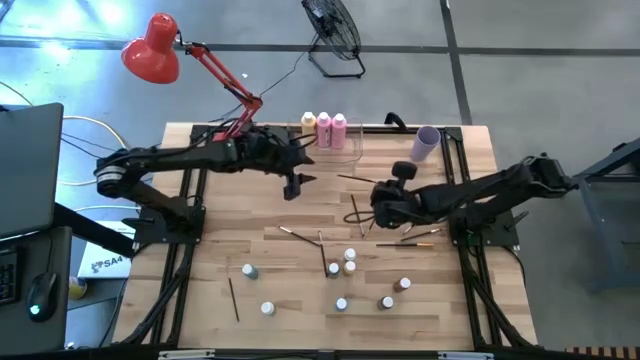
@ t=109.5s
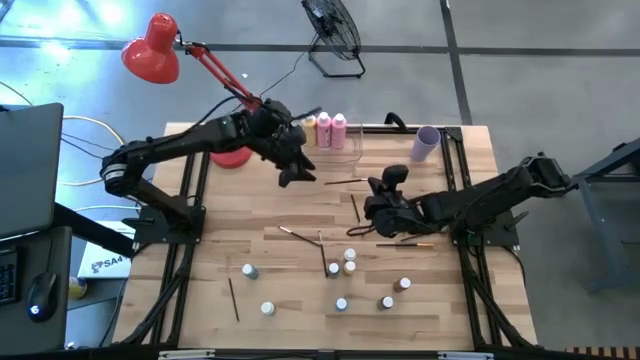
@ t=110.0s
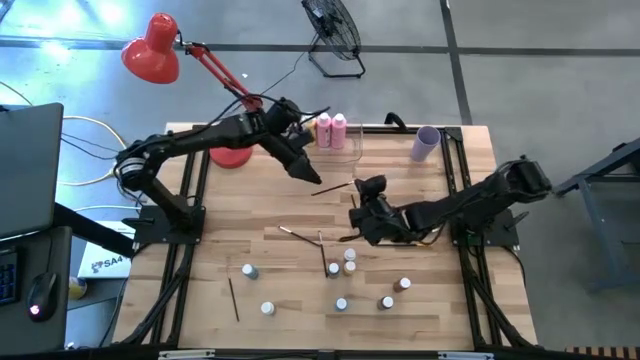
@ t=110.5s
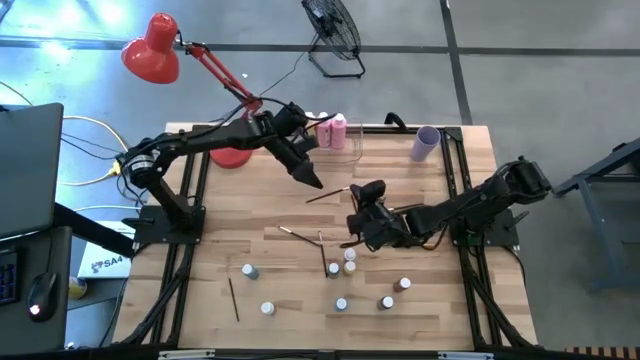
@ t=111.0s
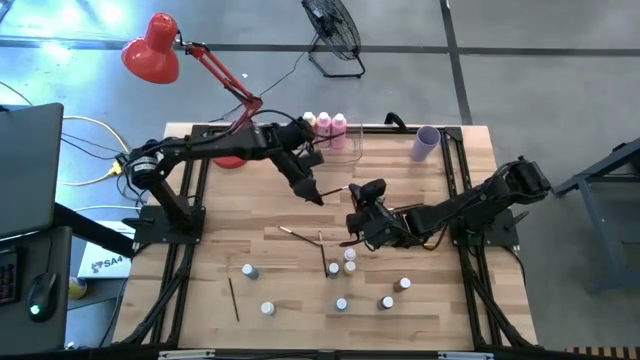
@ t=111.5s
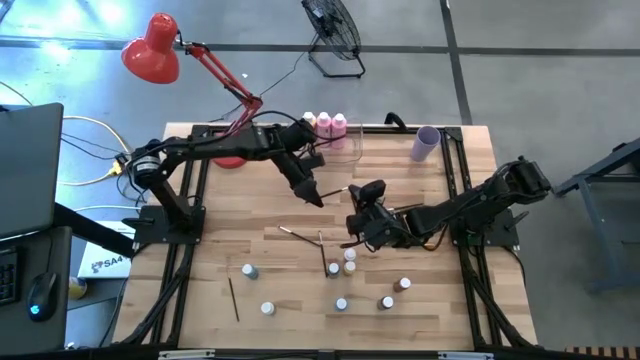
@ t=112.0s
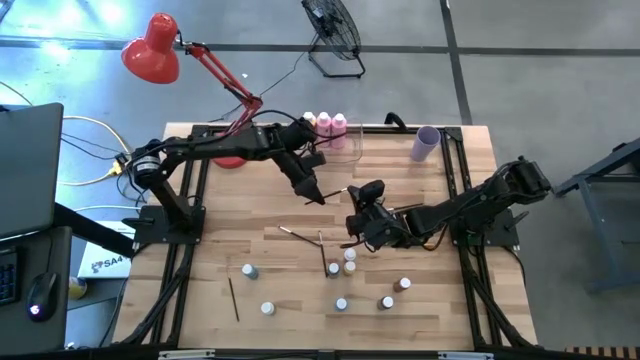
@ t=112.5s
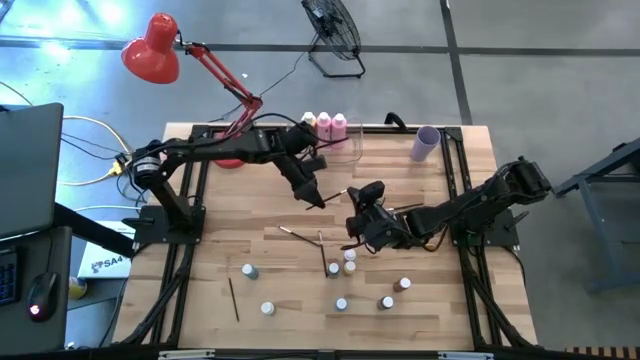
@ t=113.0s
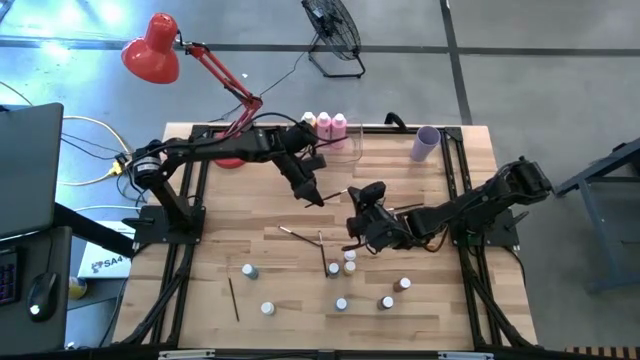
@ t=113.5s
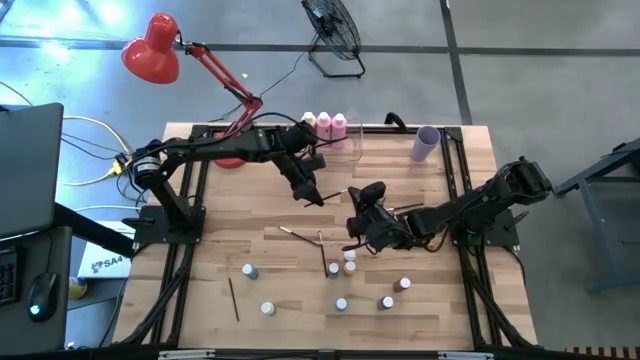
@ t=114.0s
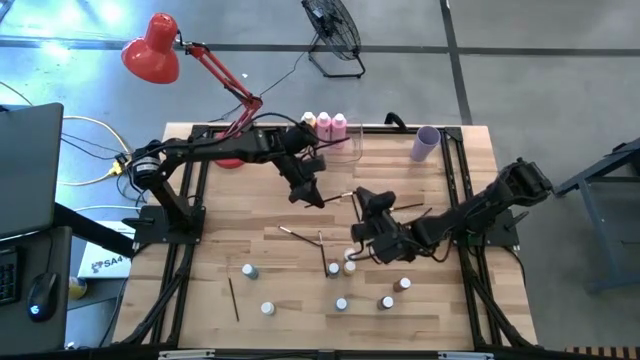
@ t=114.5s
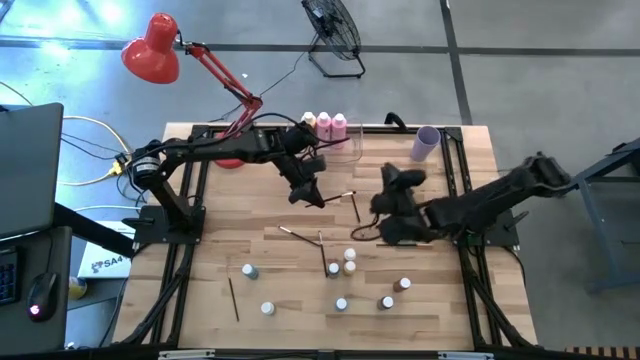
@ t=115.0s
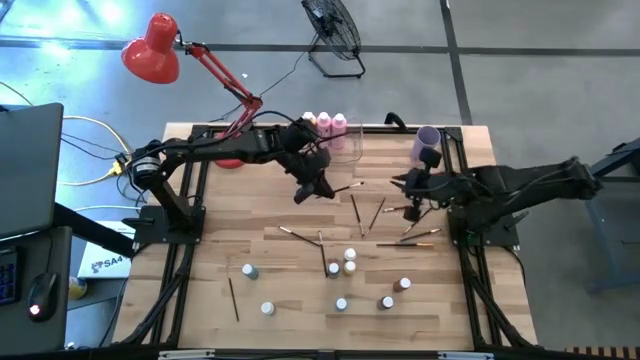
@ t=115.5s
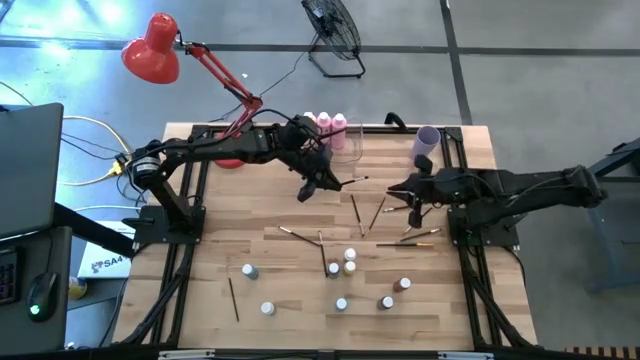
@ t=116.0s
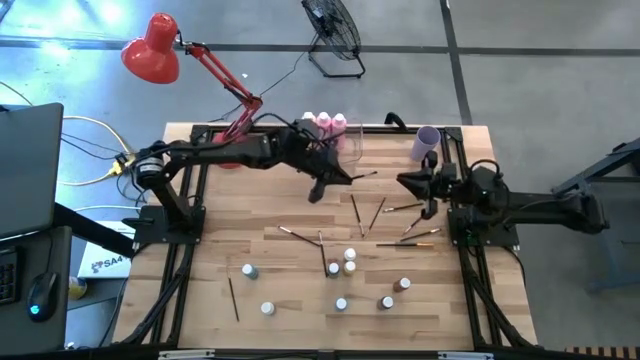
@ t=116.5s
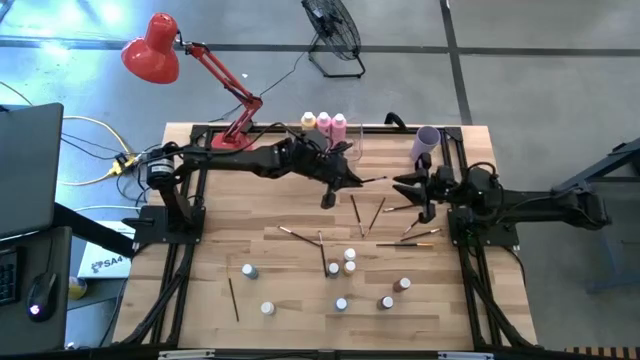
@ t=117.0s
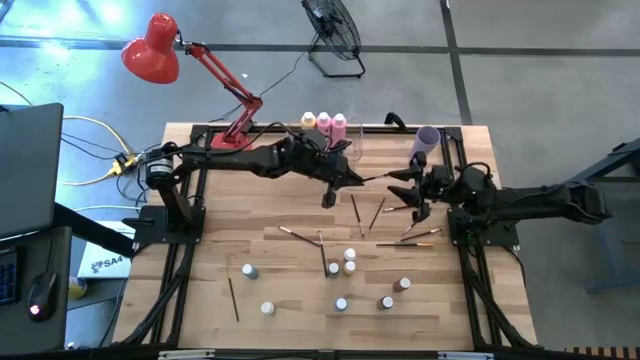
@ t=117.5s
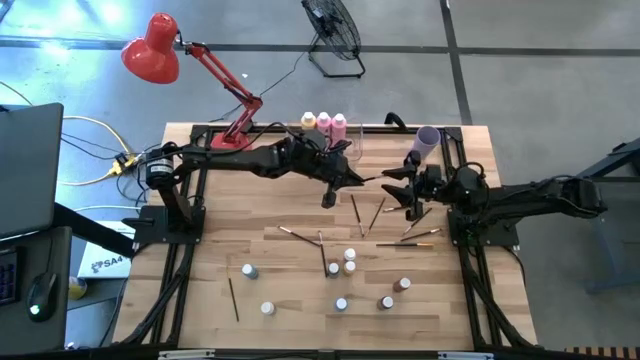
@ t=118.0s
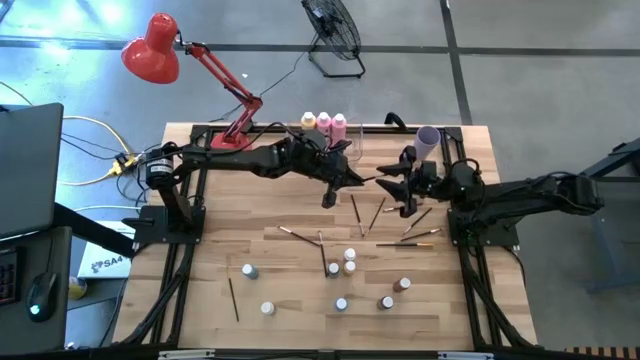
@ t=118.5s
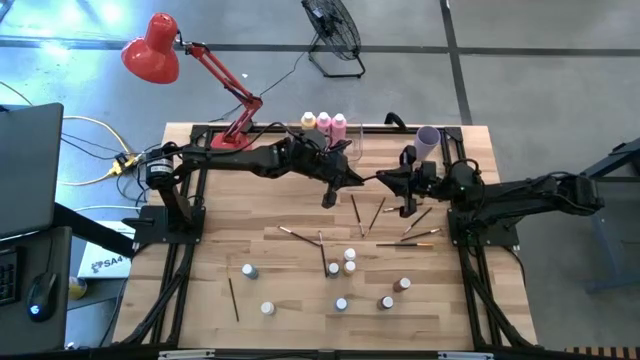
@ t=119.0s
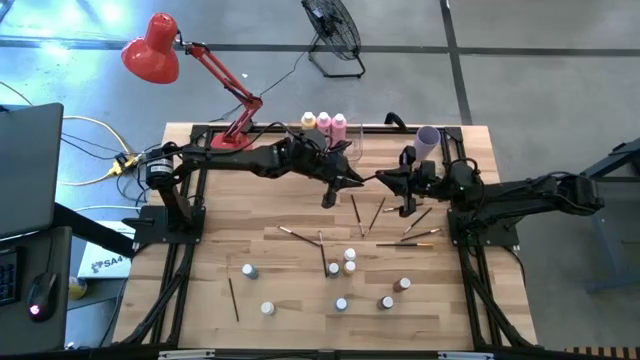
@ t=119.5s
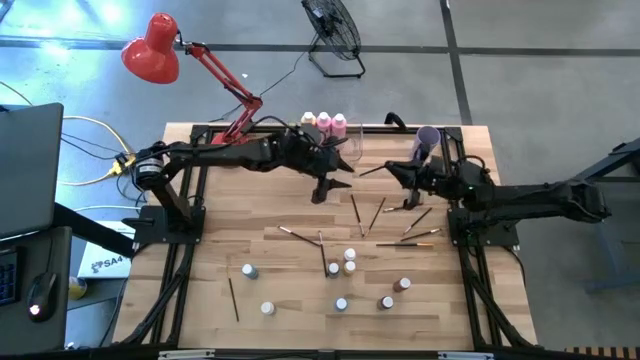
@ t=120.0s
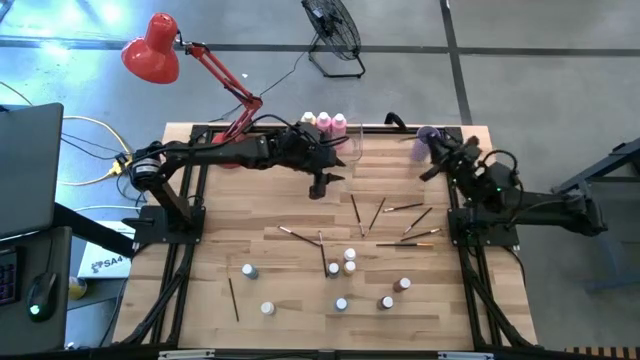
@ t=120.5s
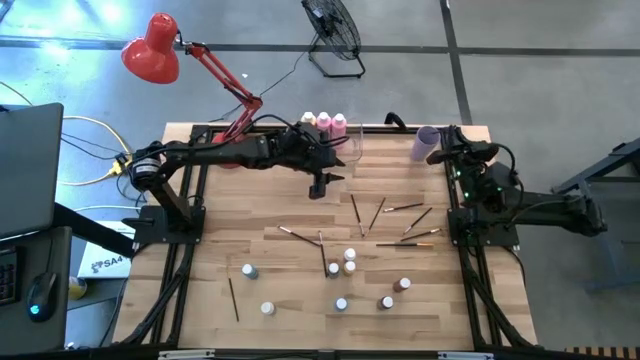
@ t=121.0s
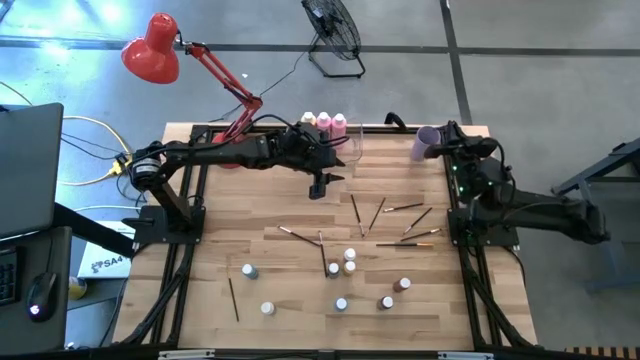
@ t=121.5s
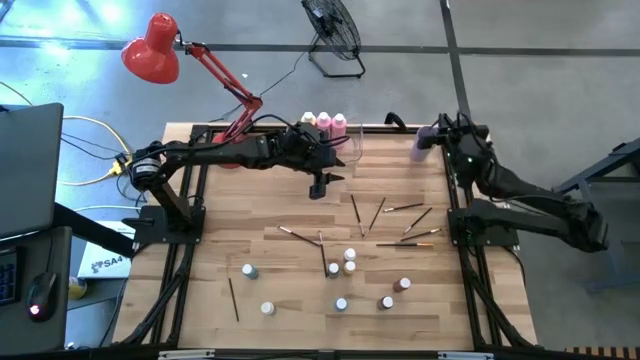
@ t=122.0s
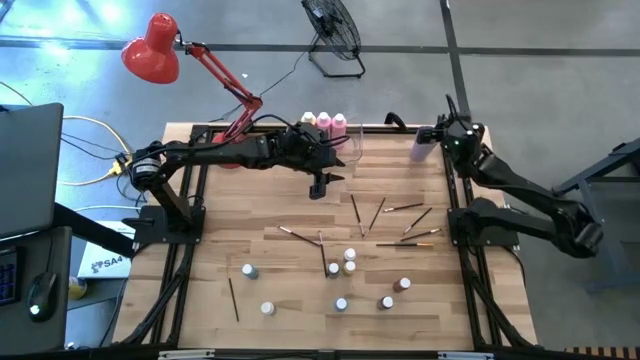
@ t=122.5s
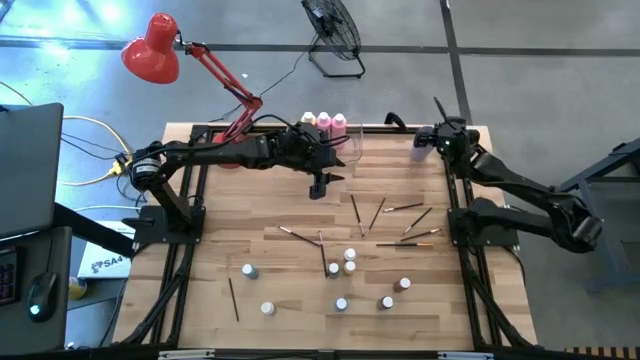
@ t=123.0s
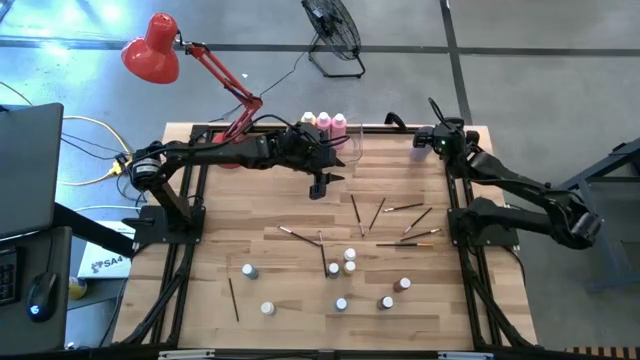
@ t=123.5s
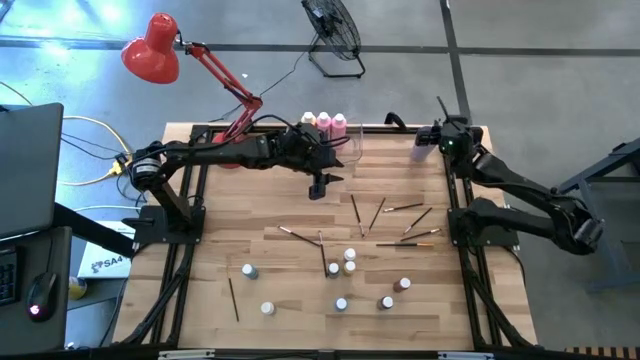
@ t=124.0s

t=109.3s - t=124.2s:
Task: Pick & Place Paint Supplies
Put the black paint brush into the violet cup

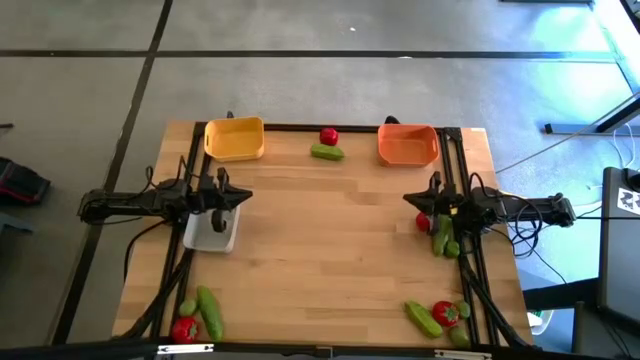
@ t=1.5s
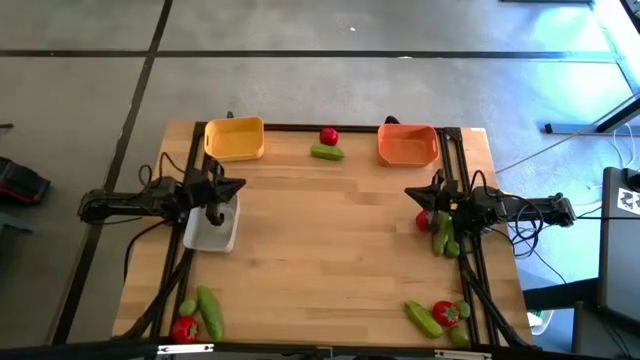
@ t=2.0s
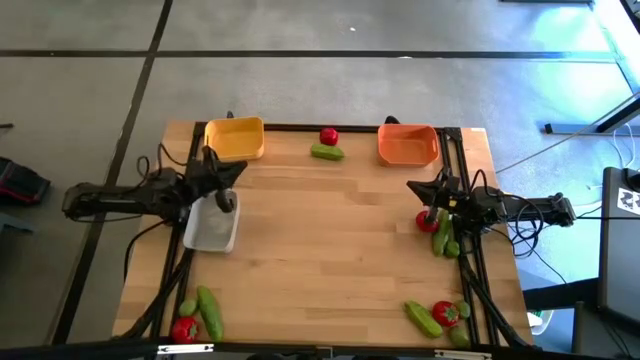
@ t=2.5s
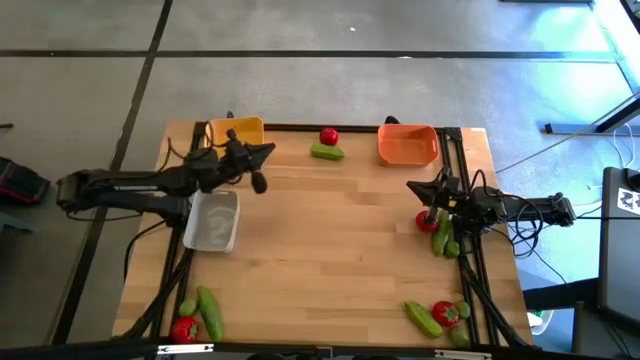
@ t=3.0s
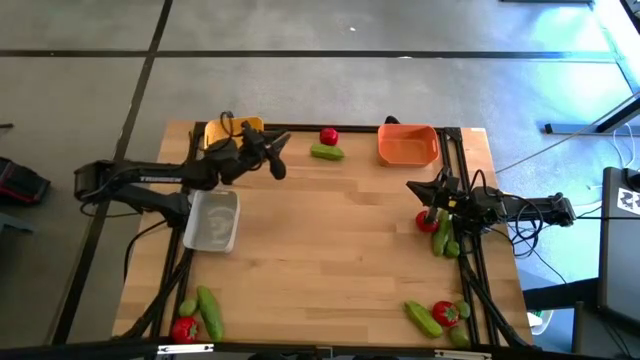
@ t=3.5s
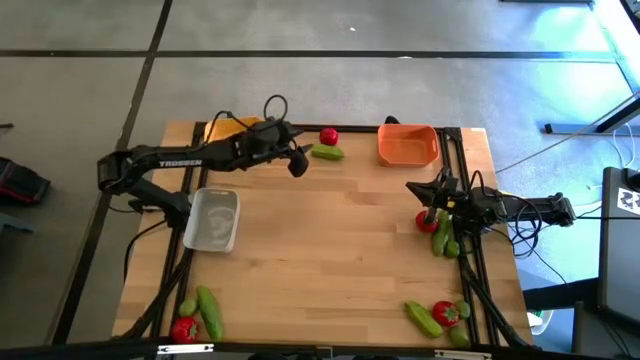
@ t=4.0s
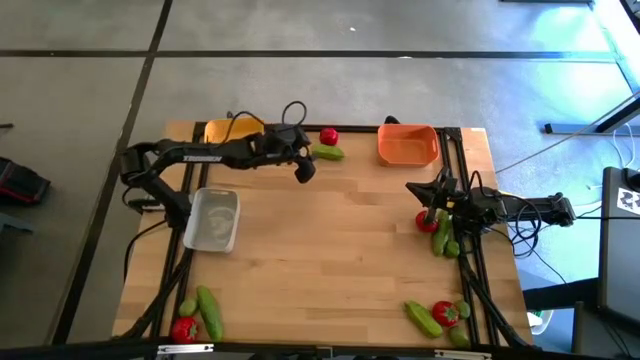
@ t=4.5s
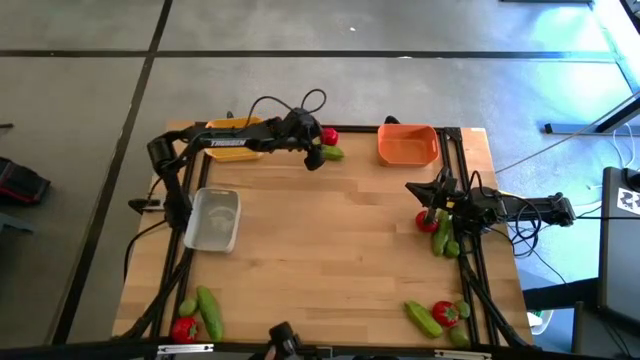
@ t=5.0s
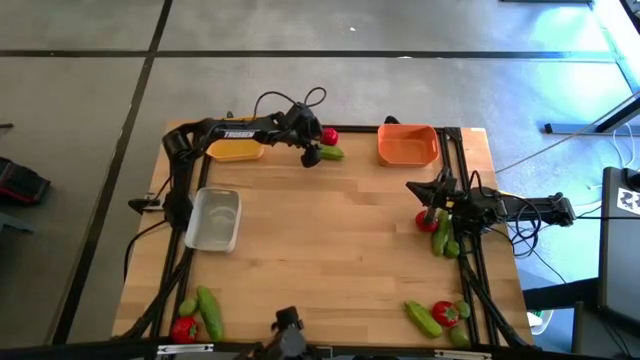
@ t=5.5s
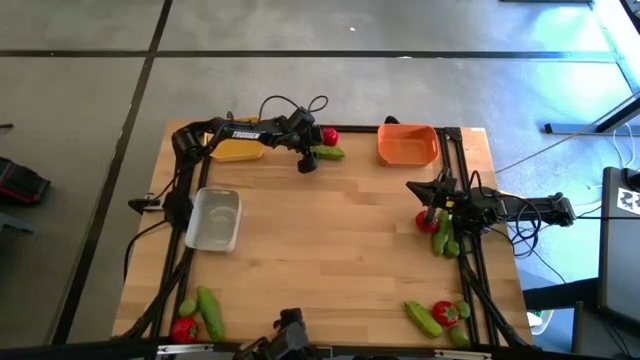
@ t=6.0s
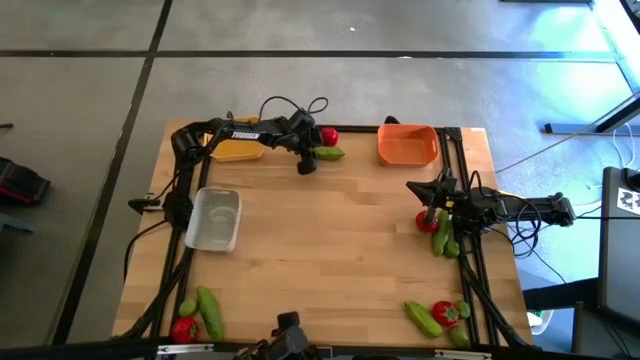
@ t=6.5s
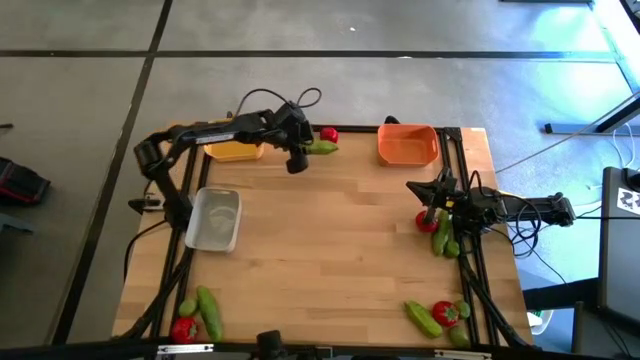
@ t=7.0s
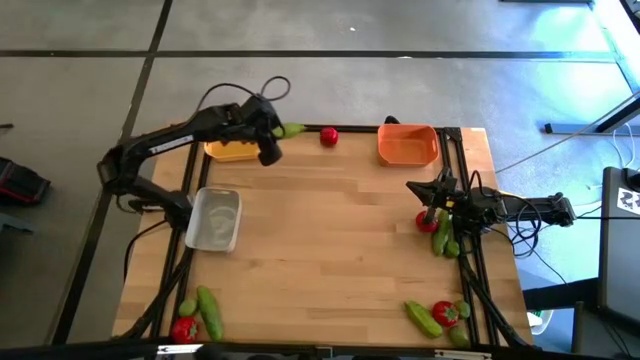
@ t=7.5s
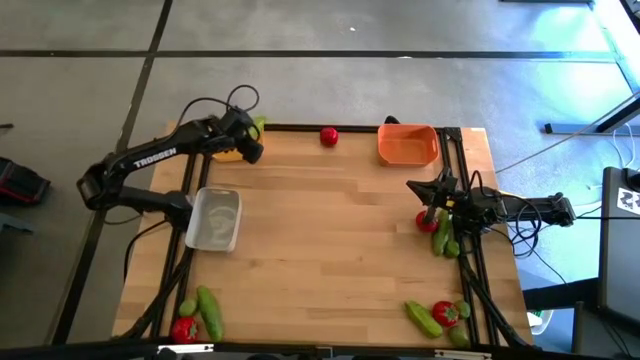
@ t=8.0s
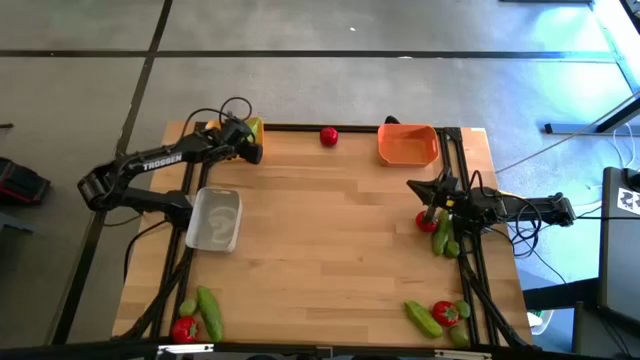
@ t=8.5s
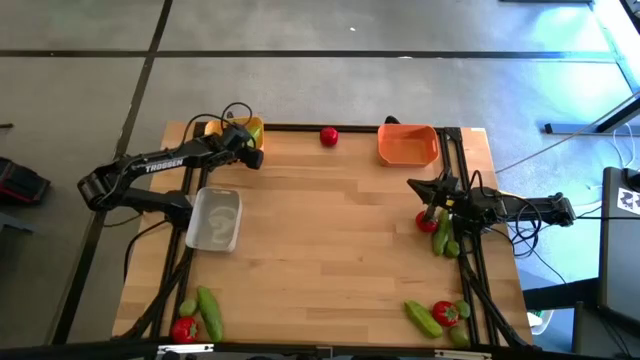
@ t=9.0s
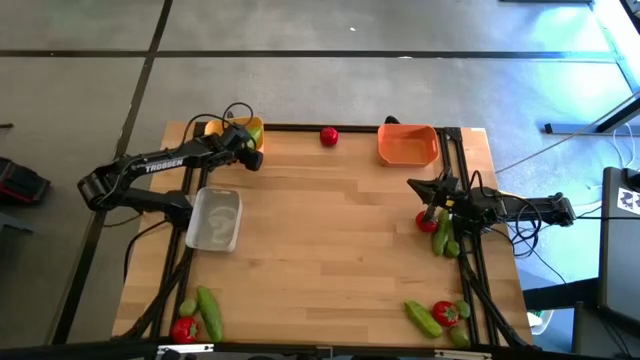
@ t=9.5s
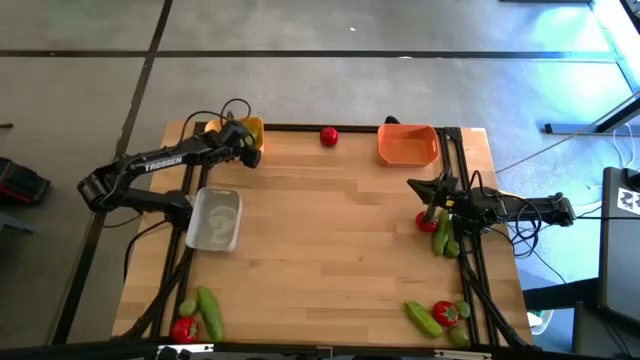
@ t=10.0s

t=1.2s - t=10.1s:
Task: Sort produce into baskets
Put the top green cucumber into the yellow bin
